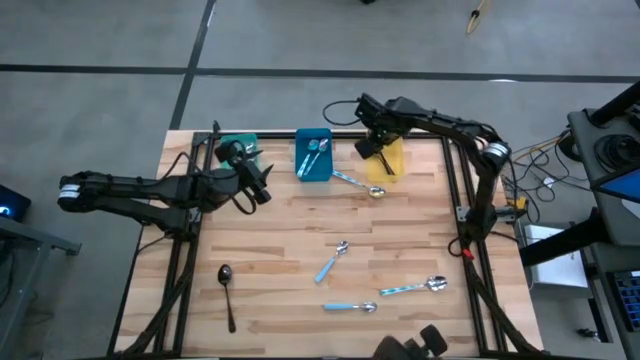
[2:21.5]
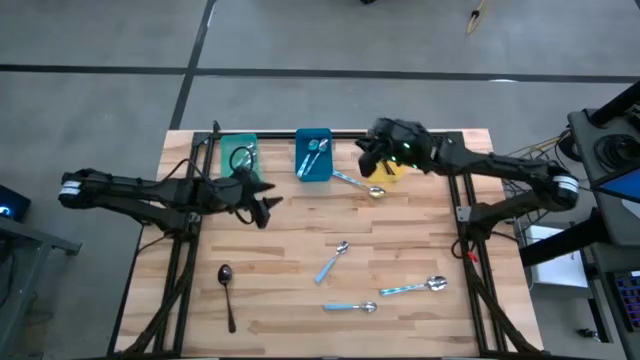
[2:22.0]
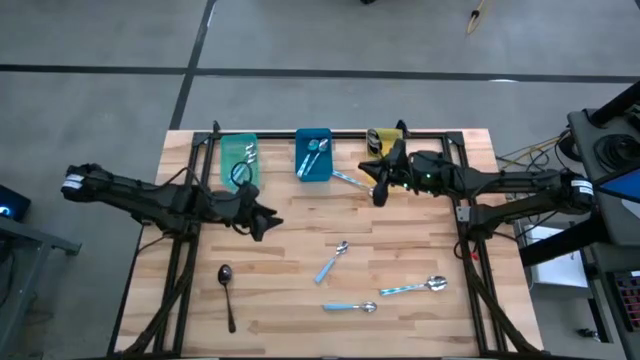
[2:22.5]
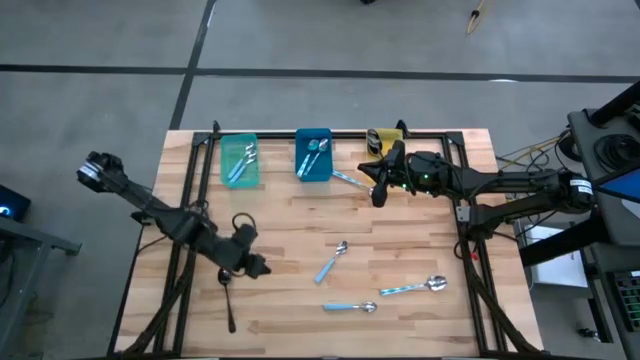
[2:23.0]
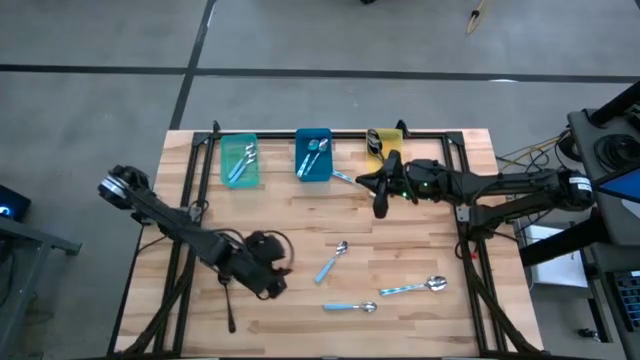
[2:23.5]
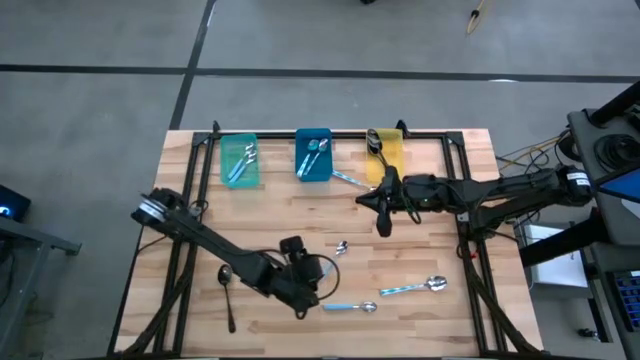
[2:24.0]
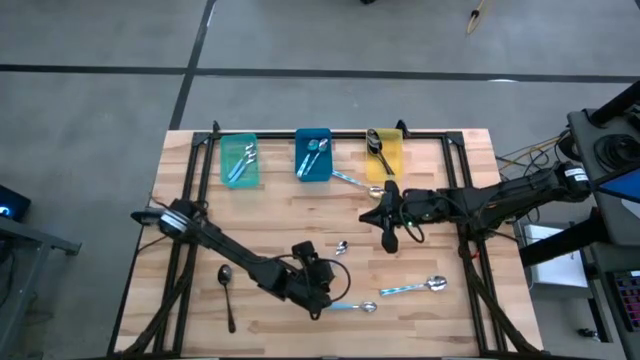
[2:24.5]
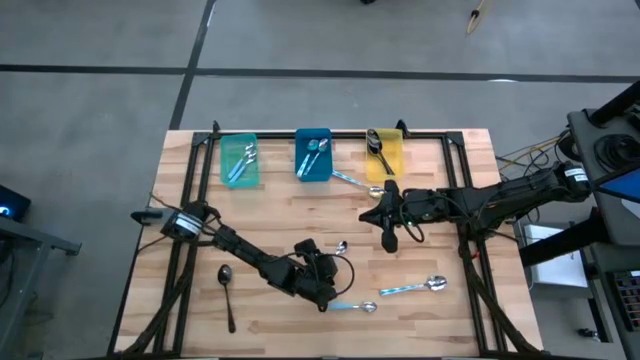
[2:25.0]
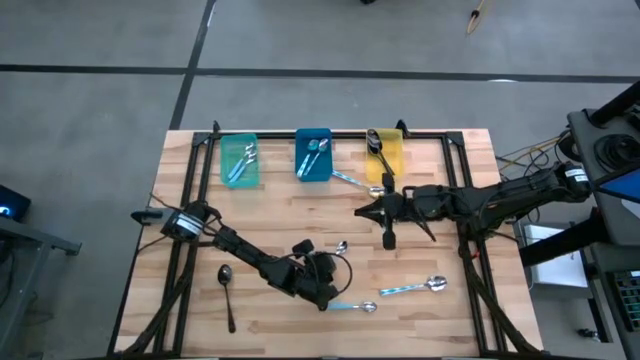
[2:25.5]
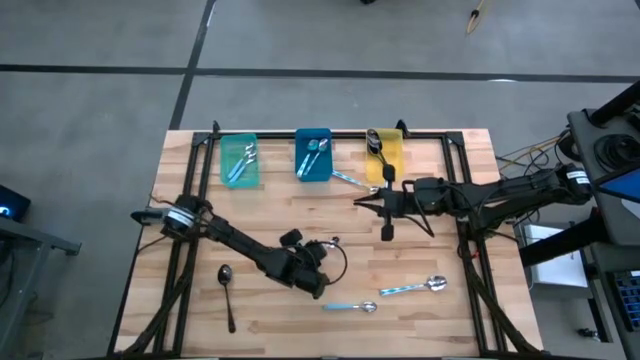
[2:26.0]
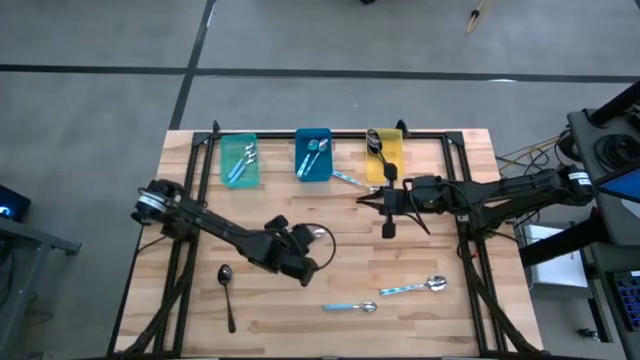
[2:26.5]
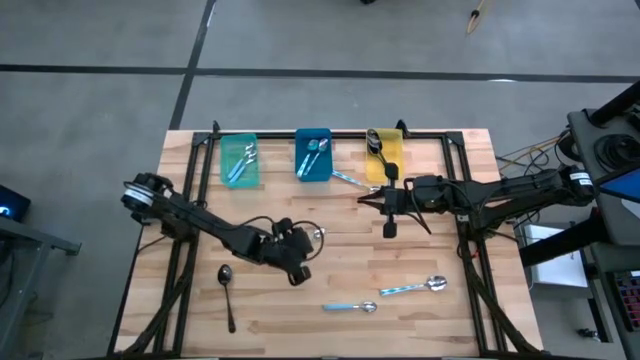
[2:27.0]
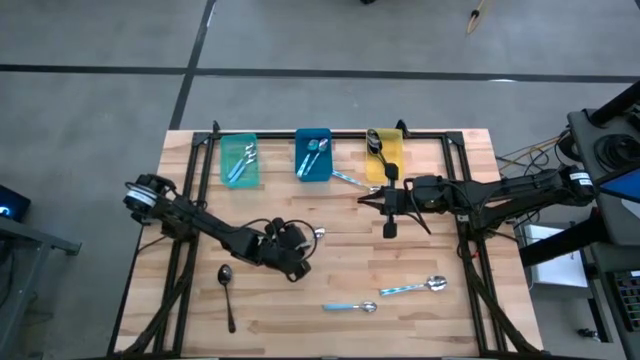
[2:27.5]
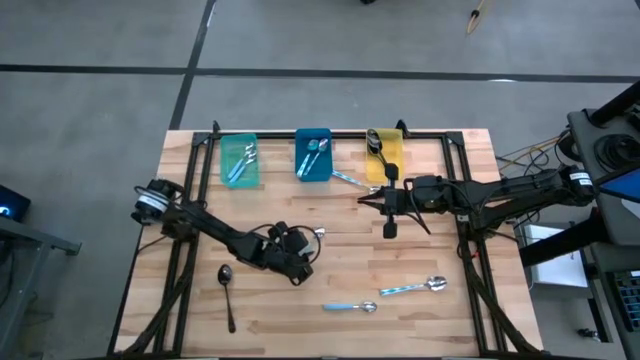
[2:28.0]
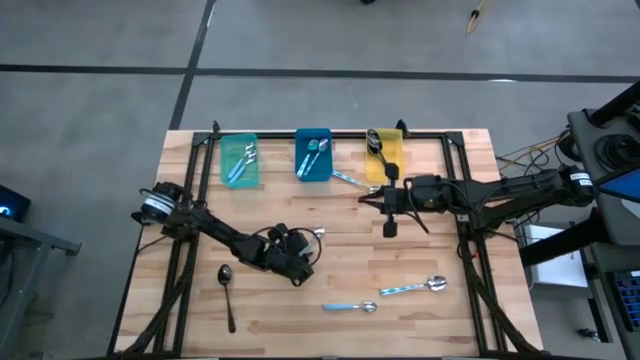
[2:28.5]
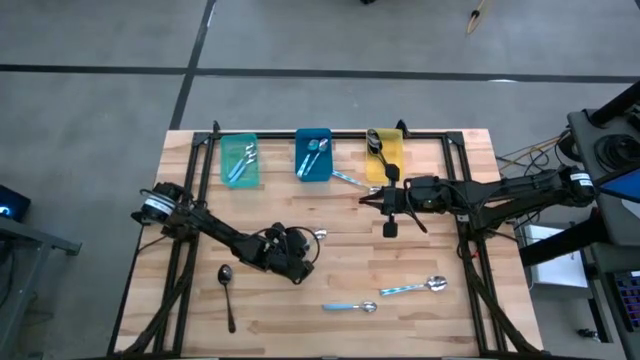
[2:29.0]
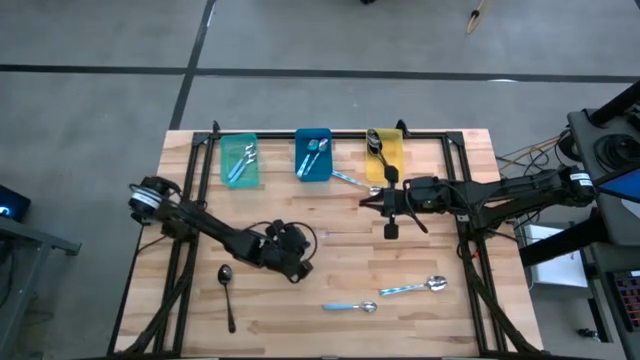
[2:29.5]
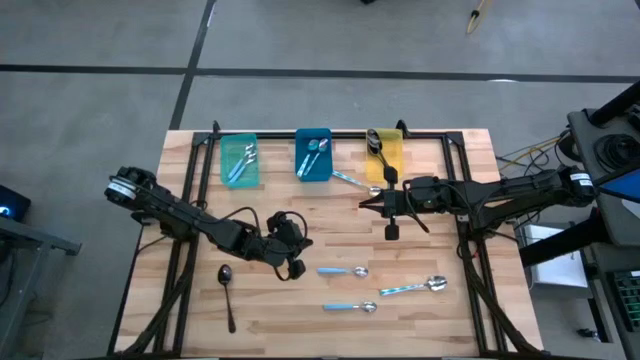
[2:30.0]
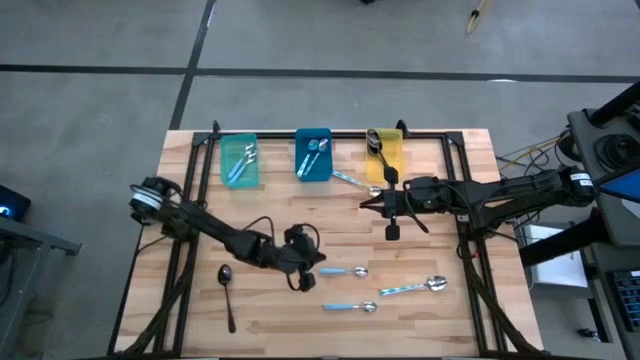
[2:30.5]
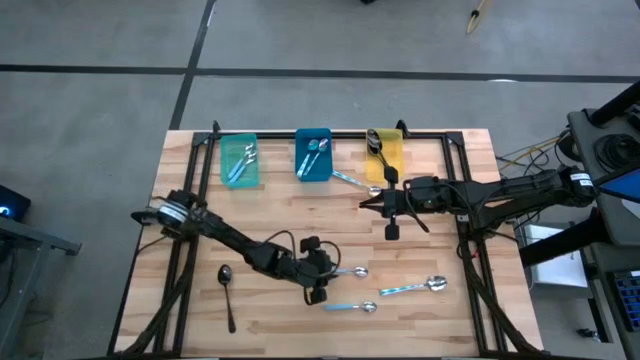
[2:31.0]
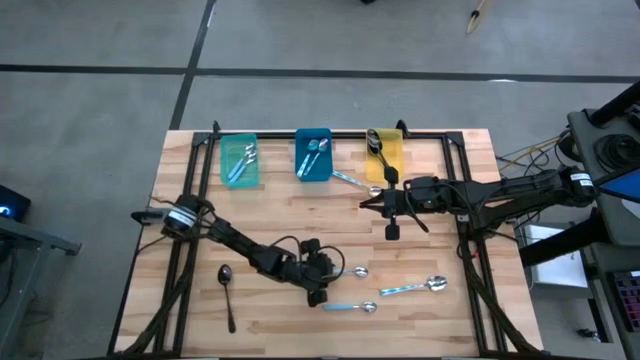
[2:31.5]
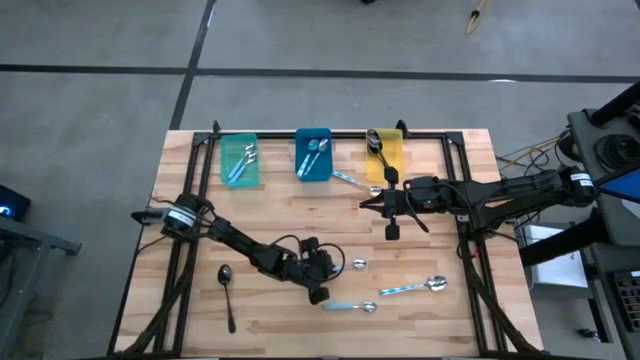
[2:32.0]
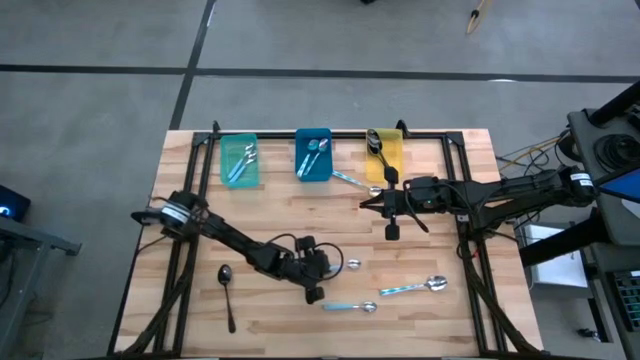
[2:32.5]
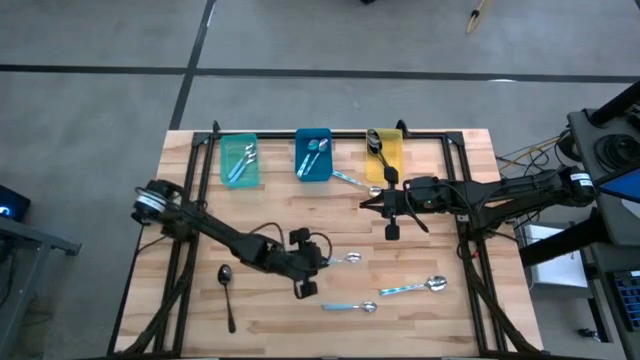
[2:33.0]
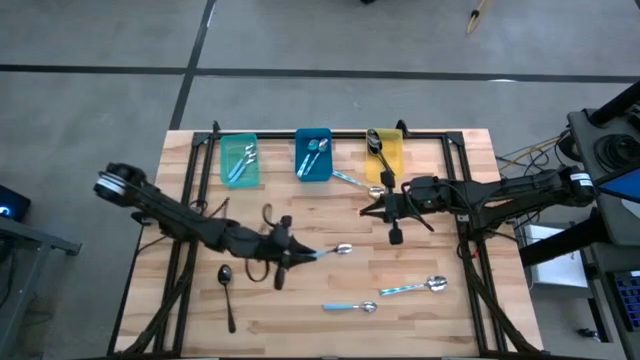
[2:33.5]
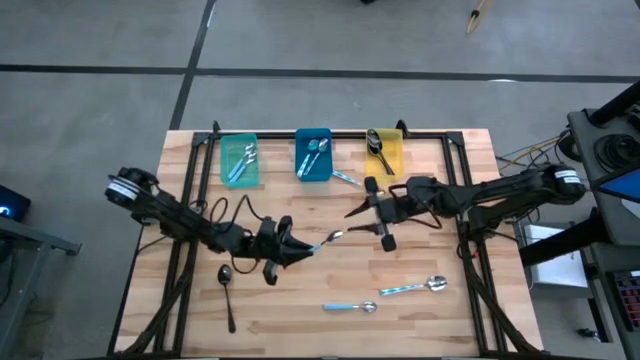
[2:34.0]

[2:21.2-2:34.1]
Task: Sort silverware by color (type)
Put the blue spoon into the green bin

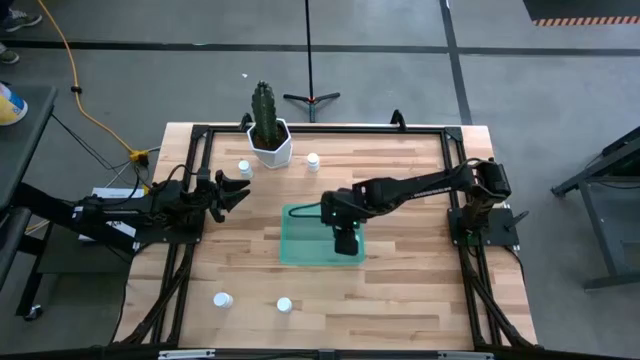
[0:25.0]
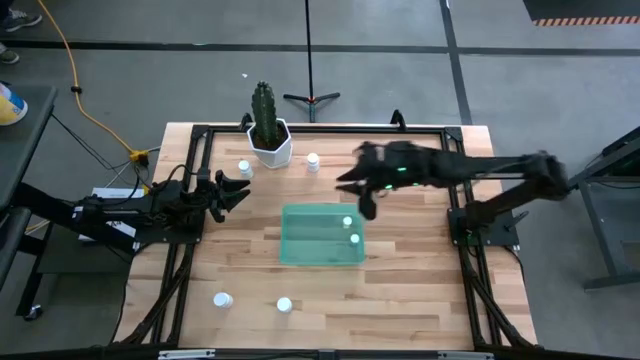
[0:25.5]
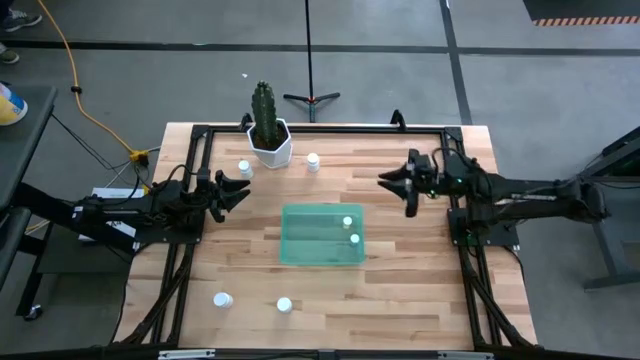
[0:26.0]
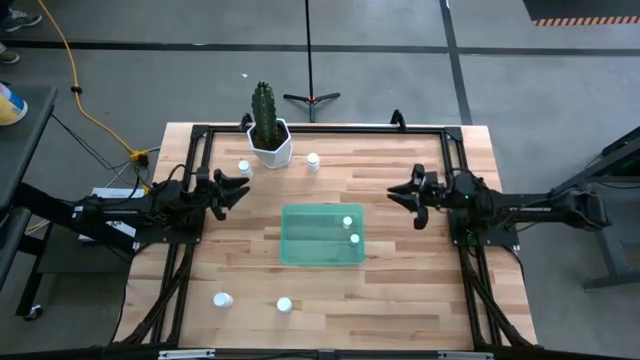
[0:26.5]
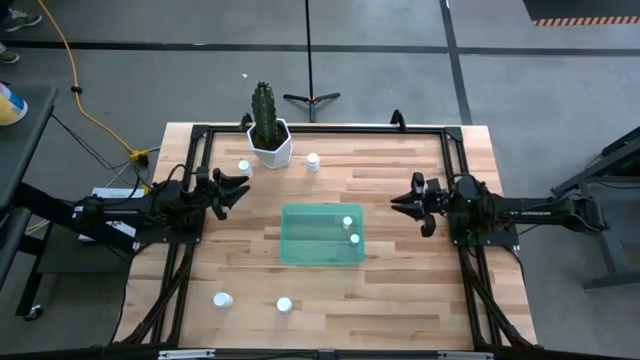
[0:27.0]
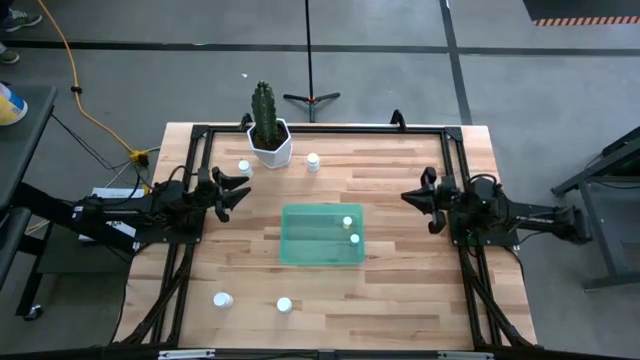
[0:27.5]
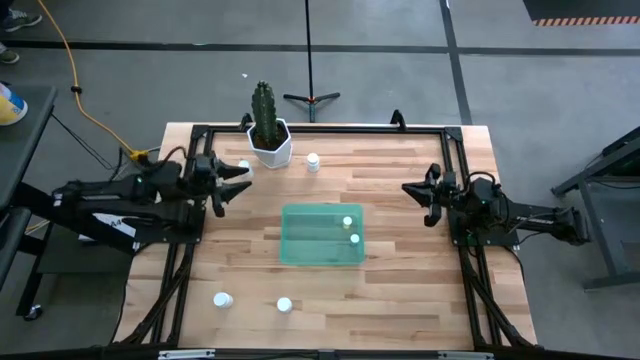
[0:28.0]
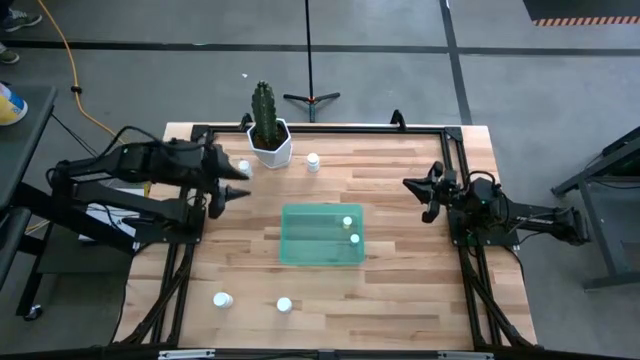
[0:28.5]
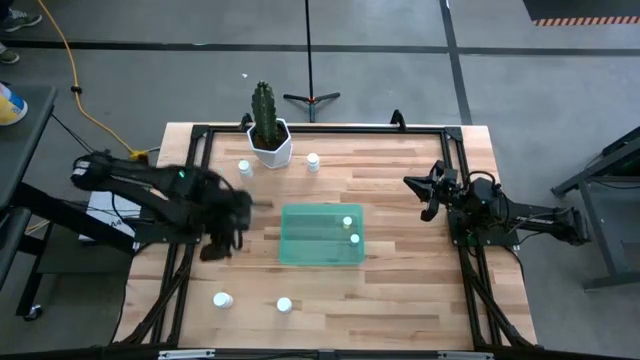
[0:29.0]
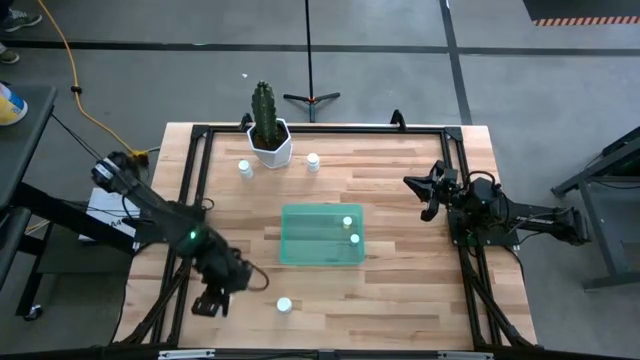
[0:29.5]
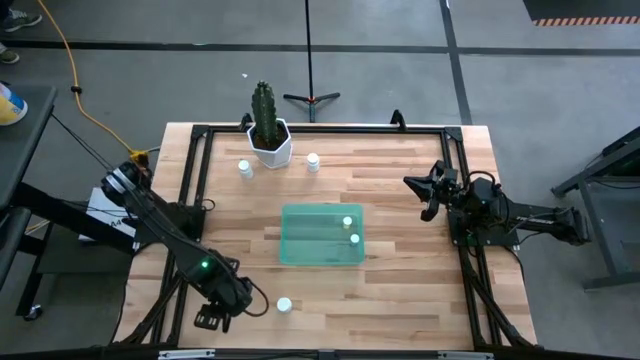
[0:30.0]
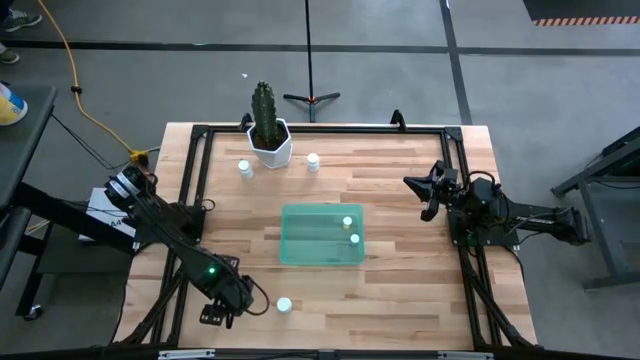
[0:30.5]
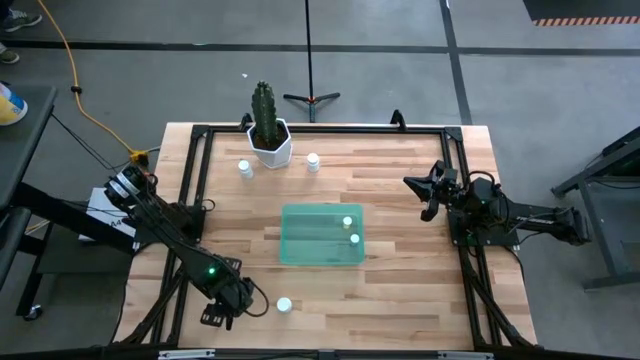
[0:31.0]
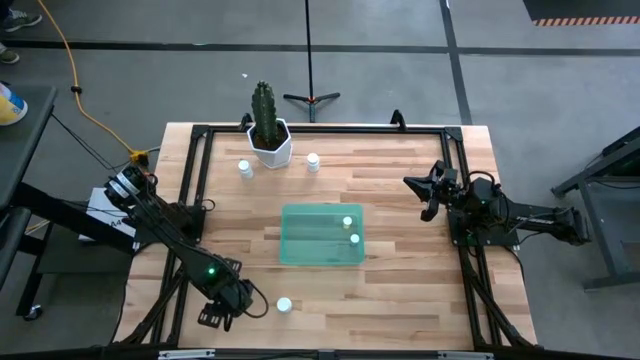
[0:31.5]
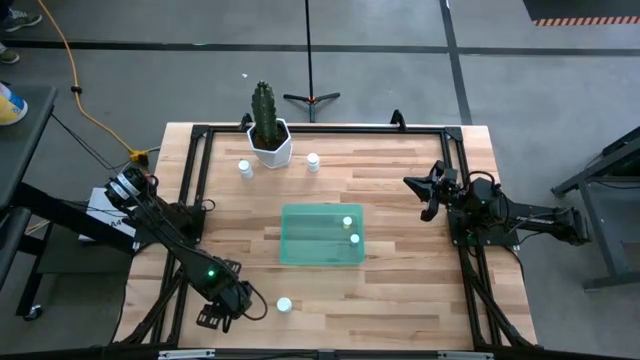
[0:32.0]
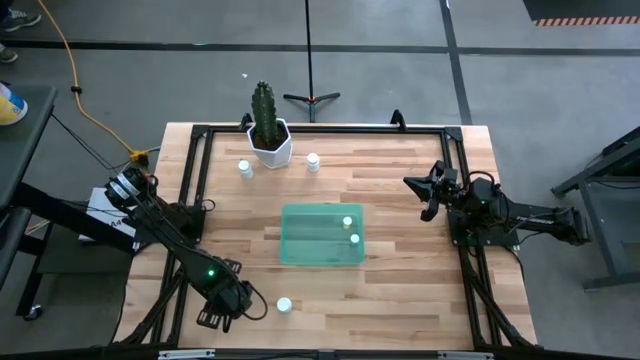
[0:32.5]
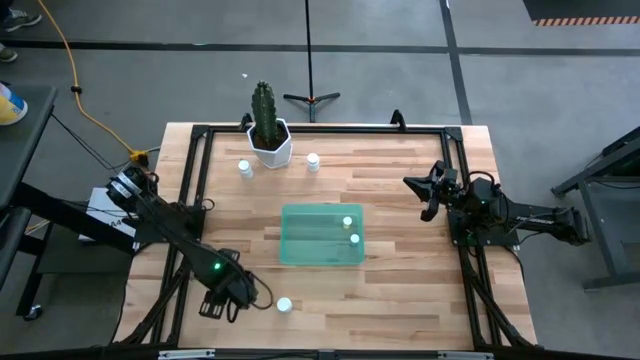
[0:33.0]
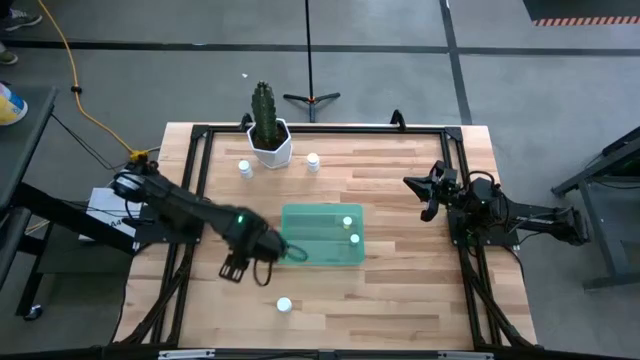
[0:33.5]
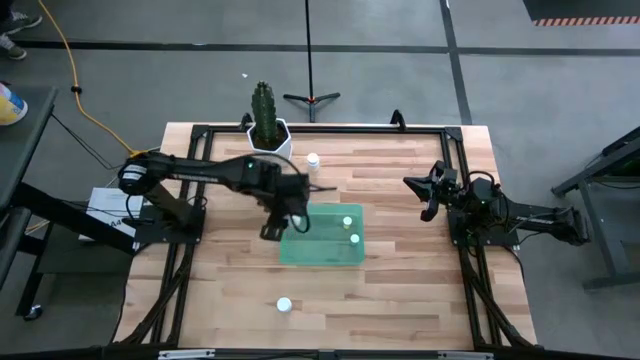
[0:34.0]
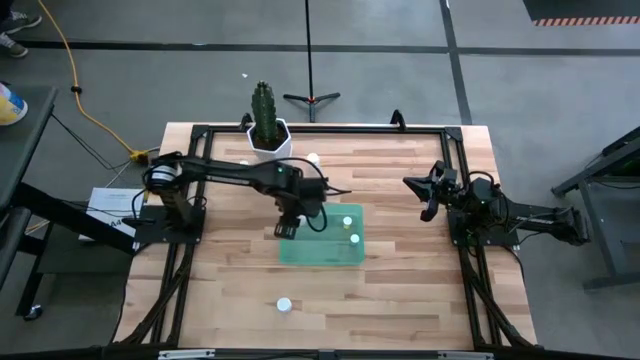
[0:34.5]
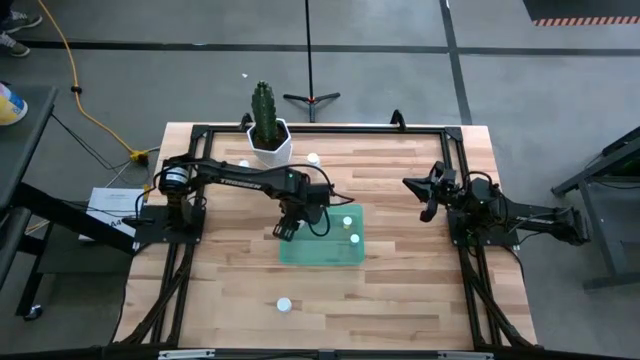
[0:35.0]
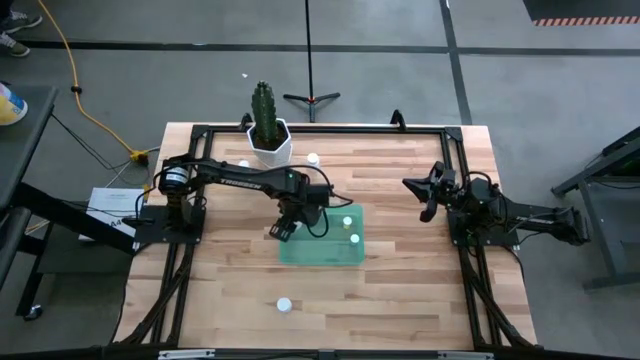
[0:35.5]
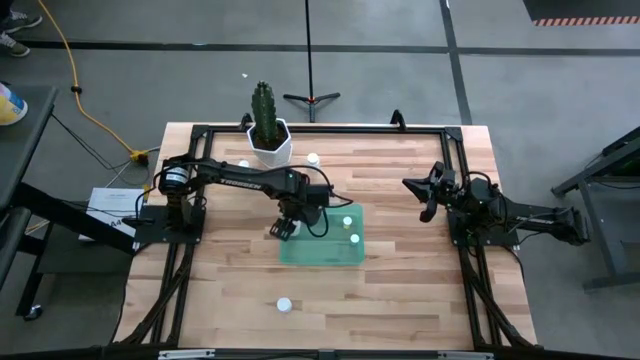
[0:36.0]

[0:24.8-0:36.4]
Task: Pick and place pill bottles into a basket
Put the white pill bottle into the blue bin
